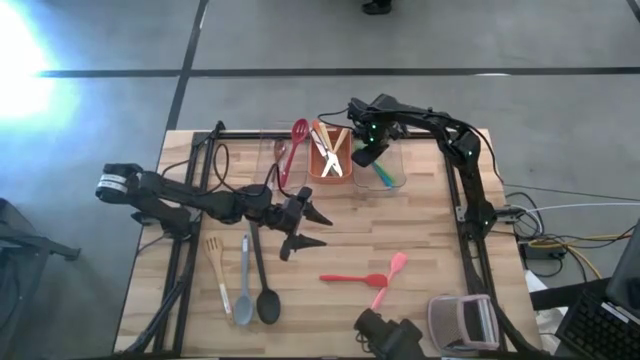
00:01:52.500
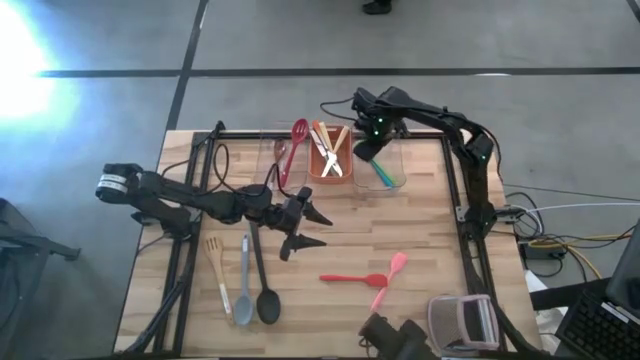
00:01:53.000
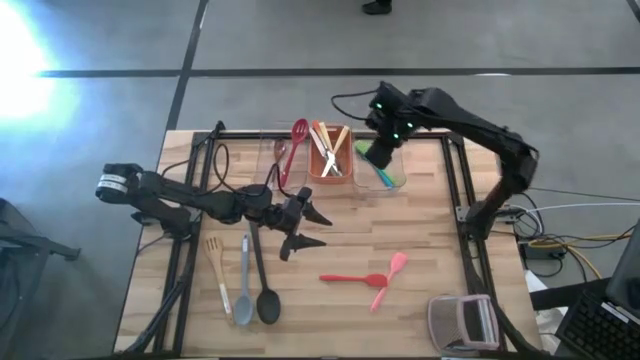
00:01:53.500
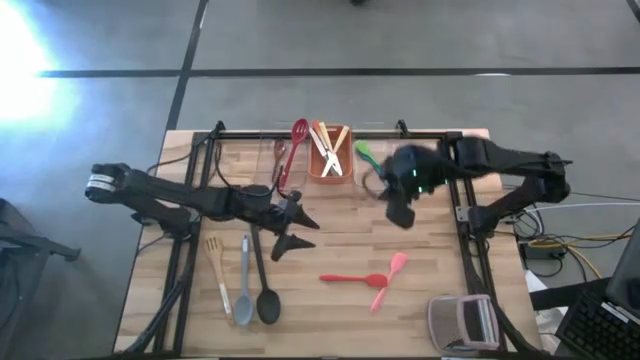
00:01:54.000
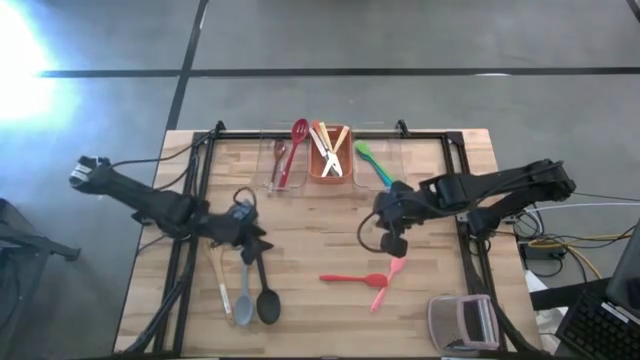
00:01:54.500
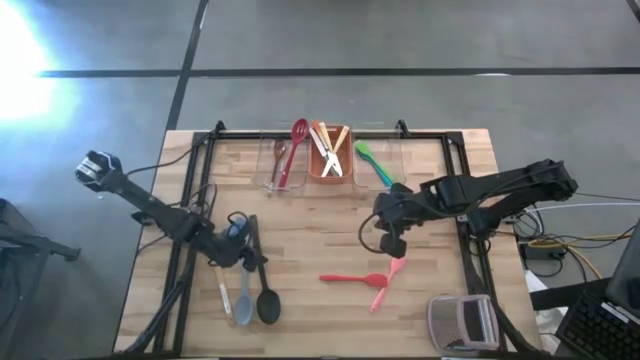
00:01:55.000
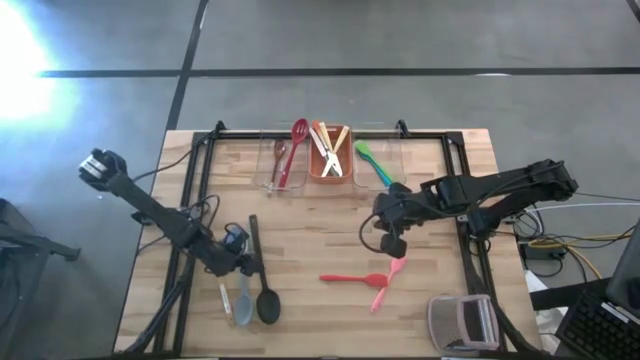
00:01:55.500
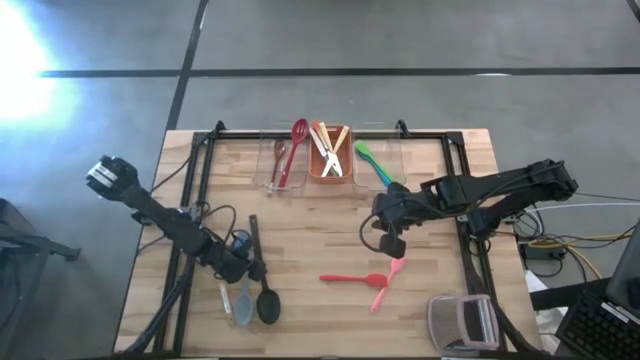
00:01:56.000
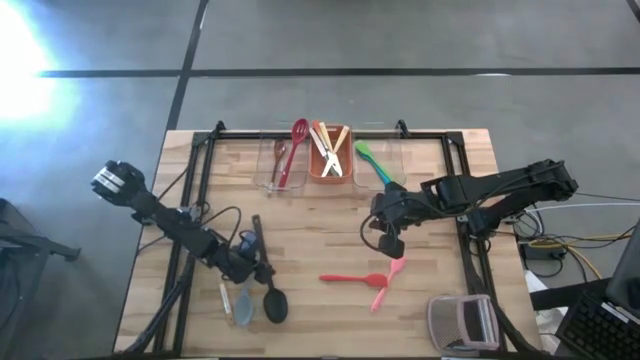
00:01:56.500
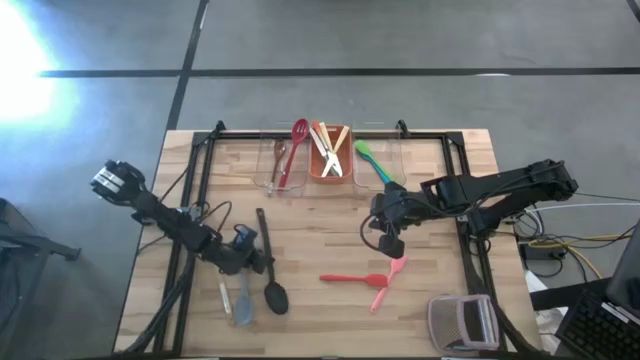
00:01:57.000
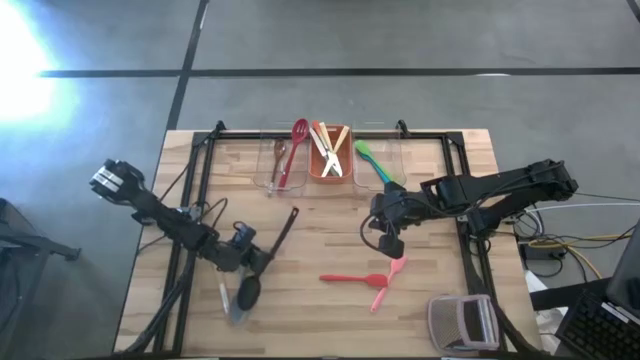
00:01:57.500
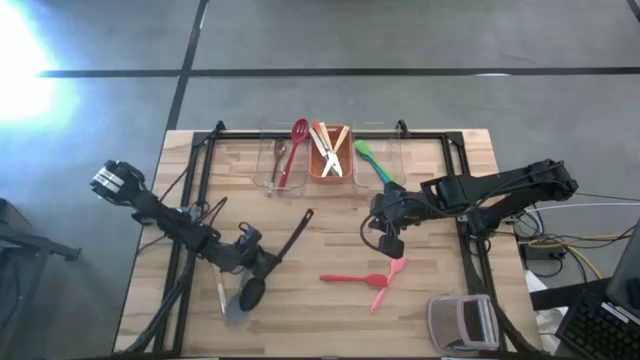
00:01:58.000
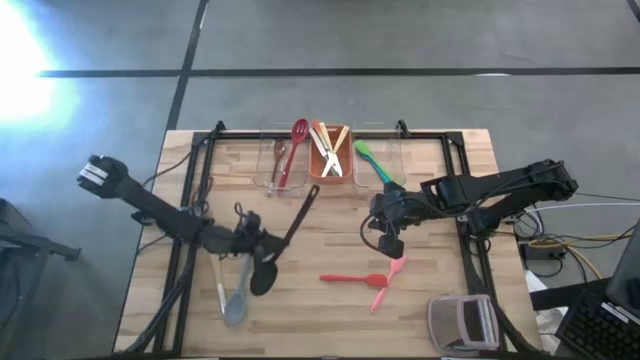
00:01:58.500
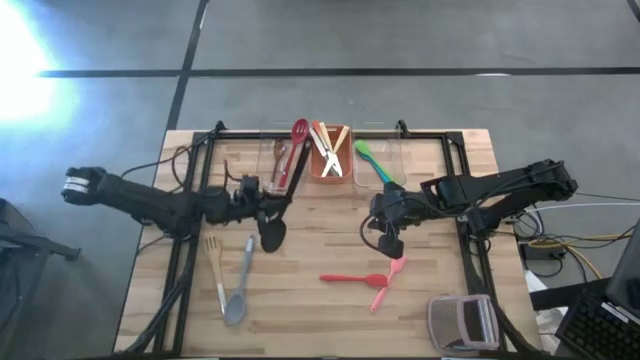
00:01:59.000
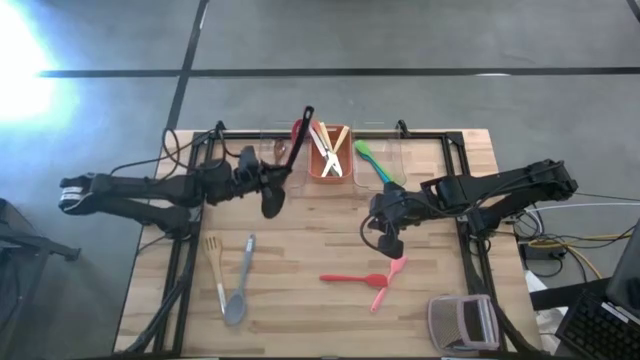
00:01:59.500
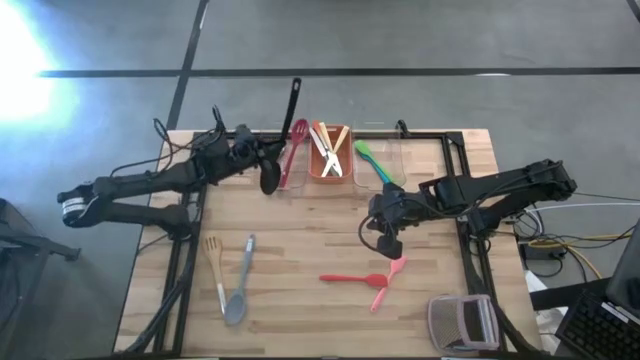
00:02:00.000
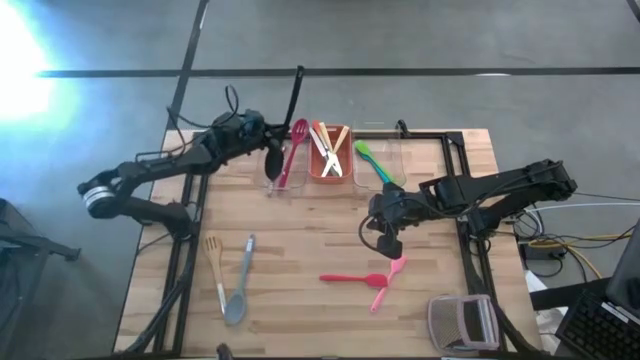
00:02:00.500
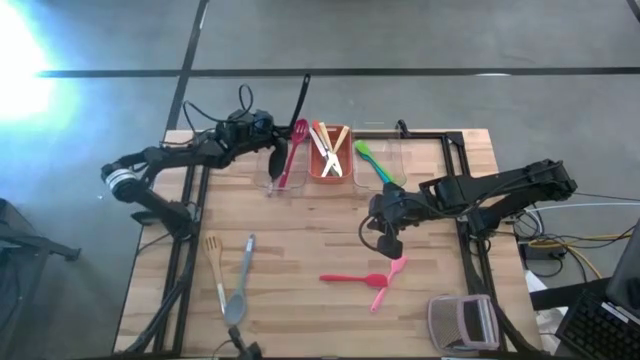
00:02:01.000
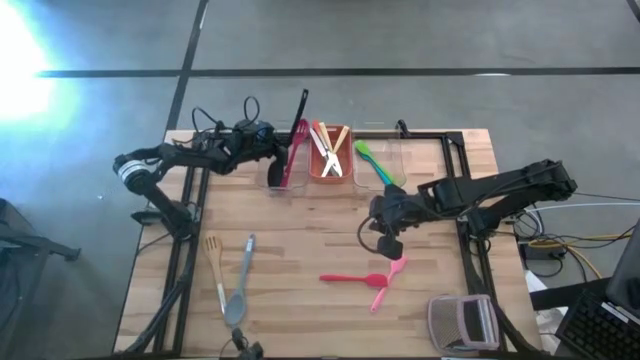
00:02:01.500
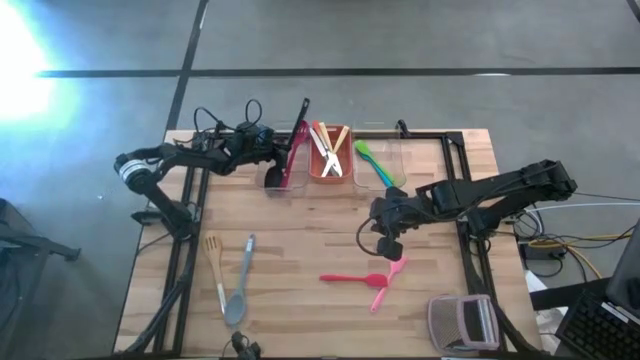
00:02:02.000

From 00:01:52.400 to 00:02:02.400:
Task: Pick & Place Kitchen Items
Put the black serving spoon into the left transparent bin

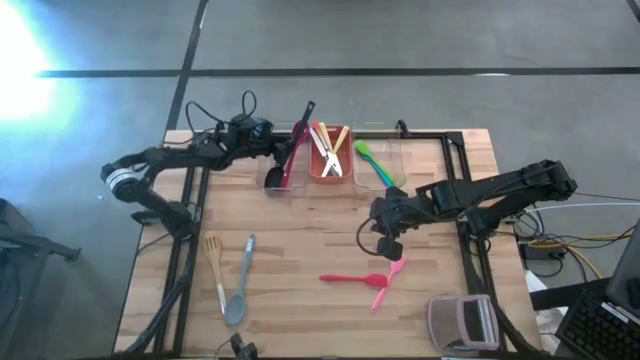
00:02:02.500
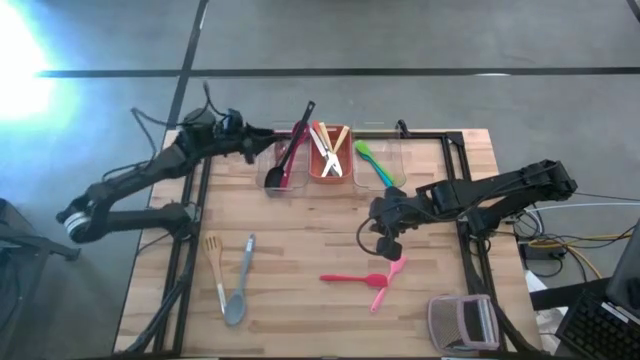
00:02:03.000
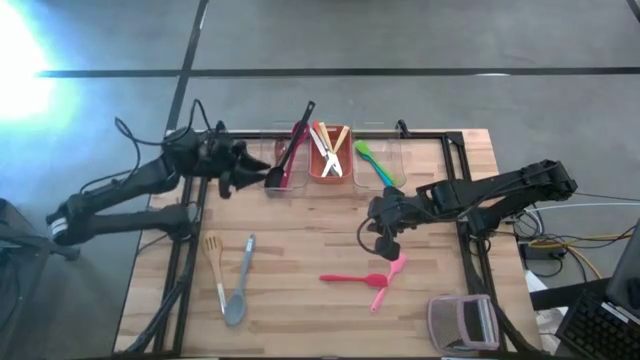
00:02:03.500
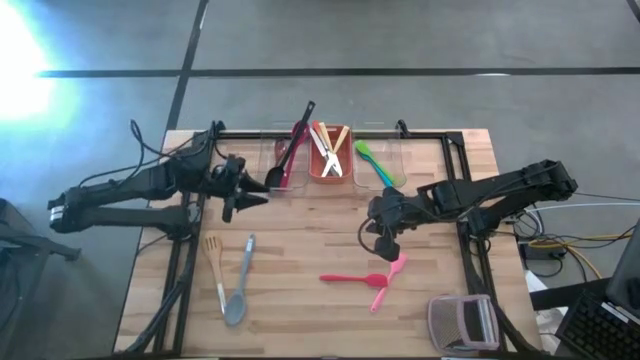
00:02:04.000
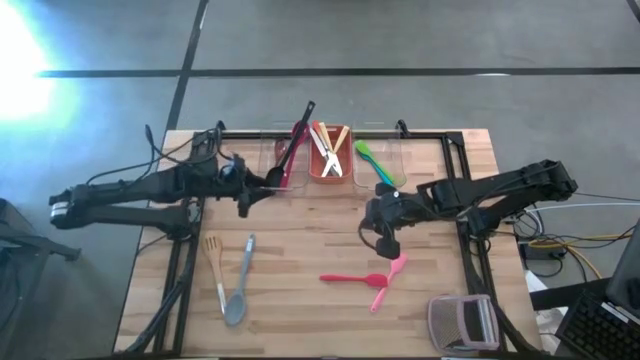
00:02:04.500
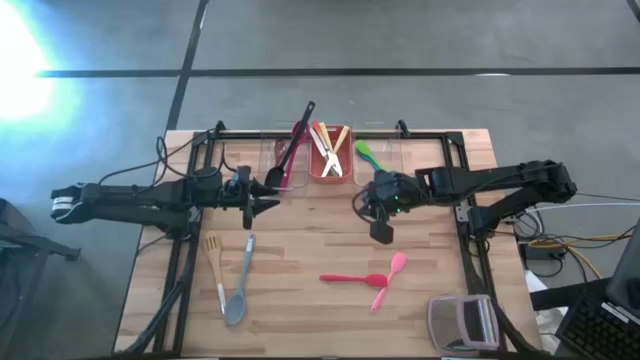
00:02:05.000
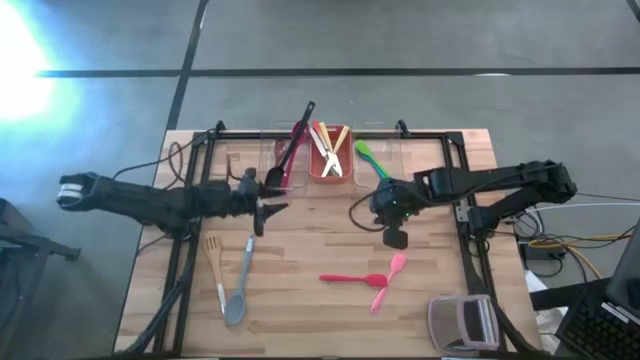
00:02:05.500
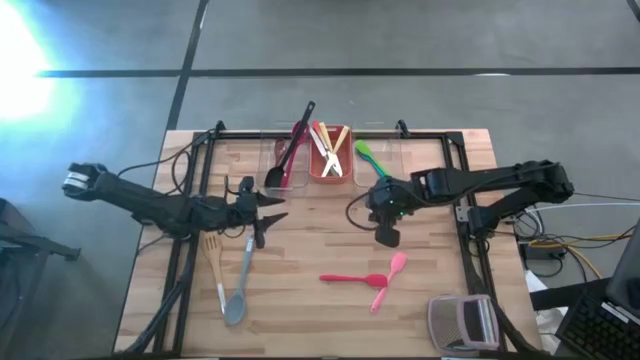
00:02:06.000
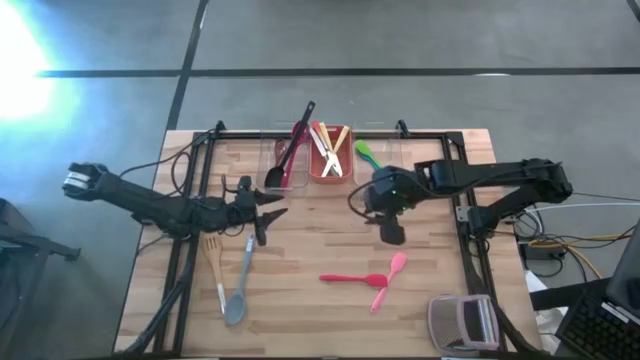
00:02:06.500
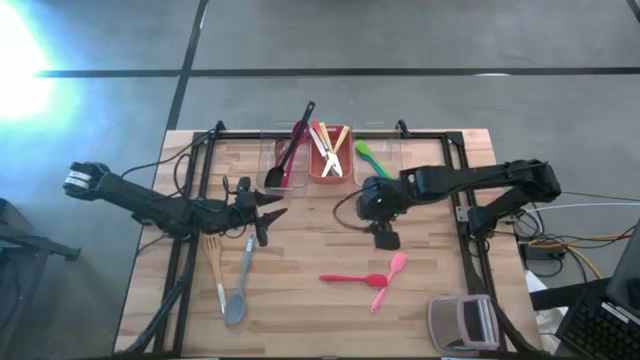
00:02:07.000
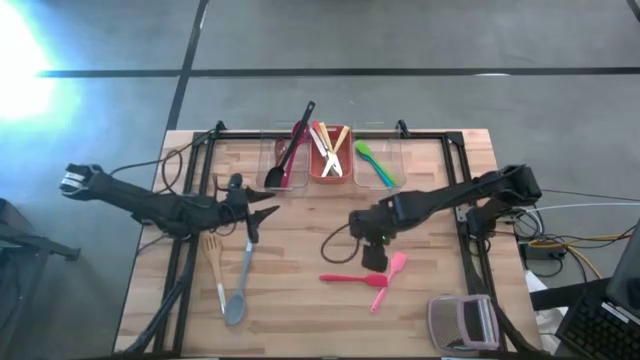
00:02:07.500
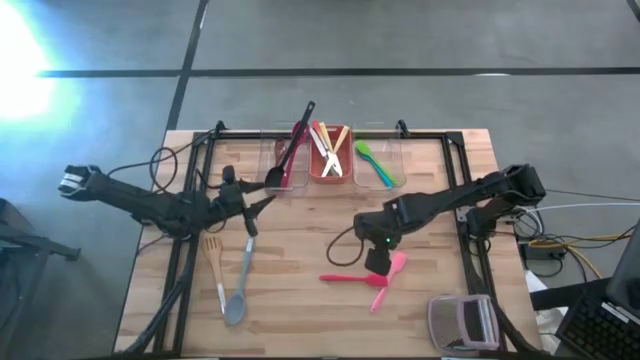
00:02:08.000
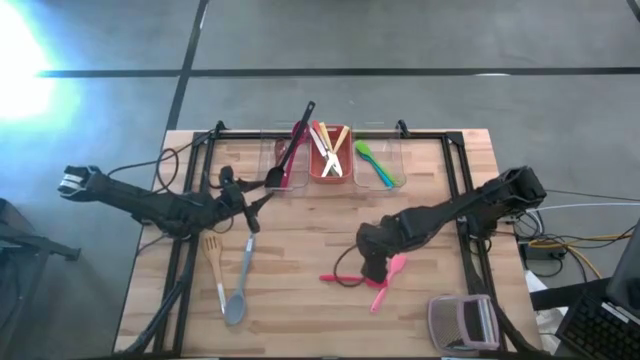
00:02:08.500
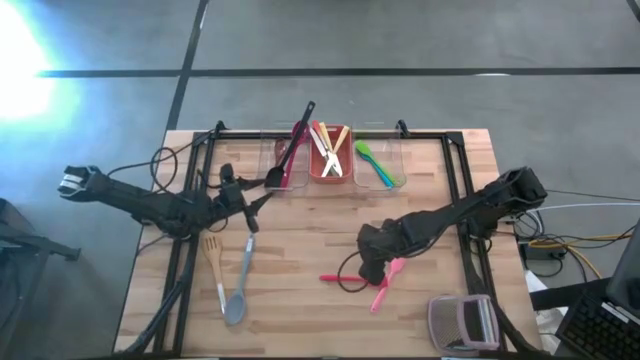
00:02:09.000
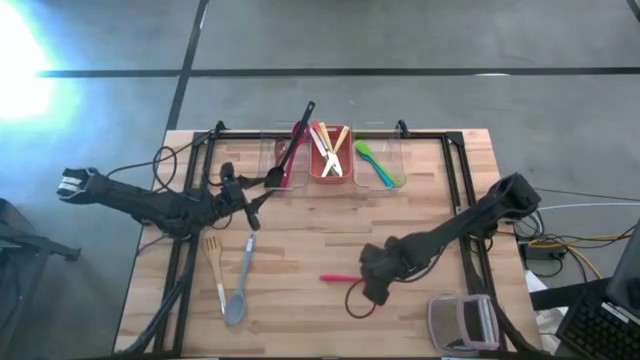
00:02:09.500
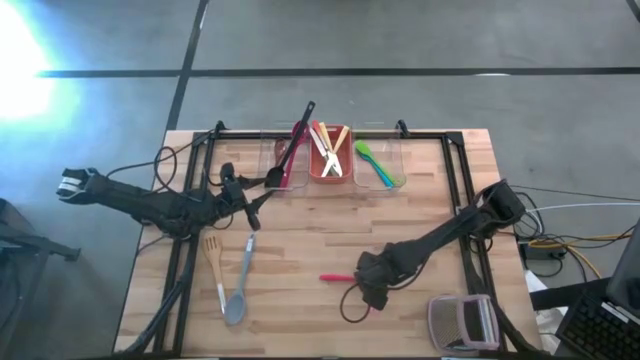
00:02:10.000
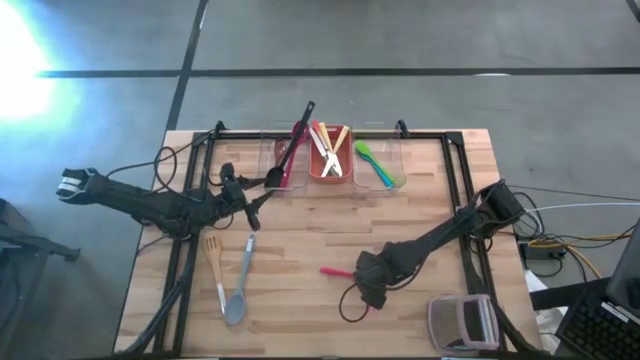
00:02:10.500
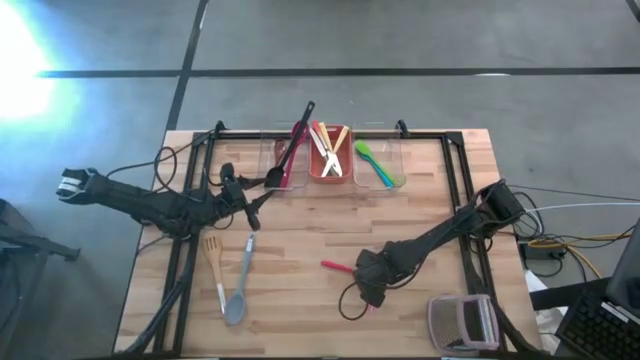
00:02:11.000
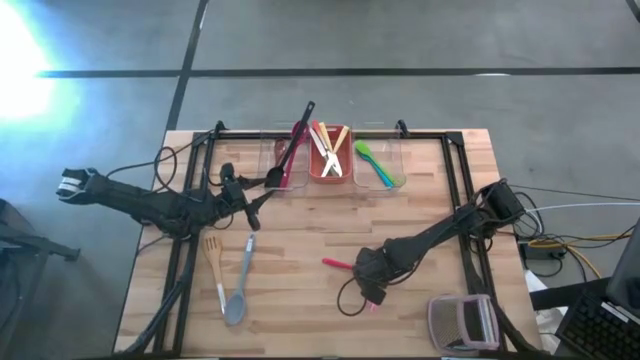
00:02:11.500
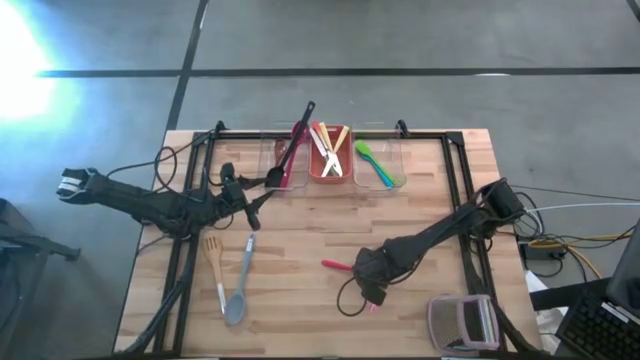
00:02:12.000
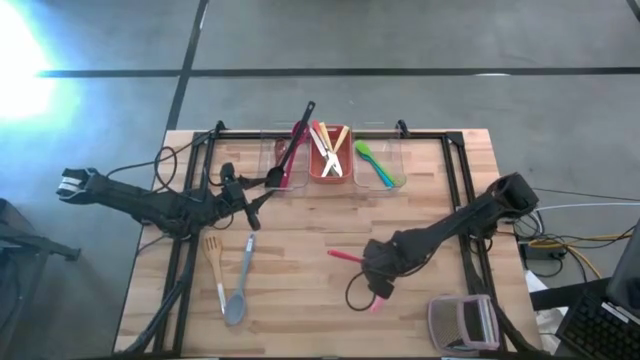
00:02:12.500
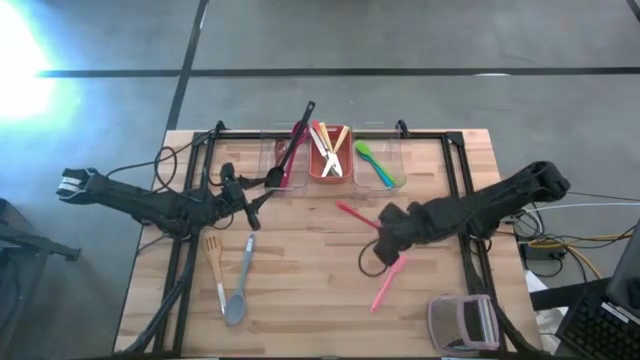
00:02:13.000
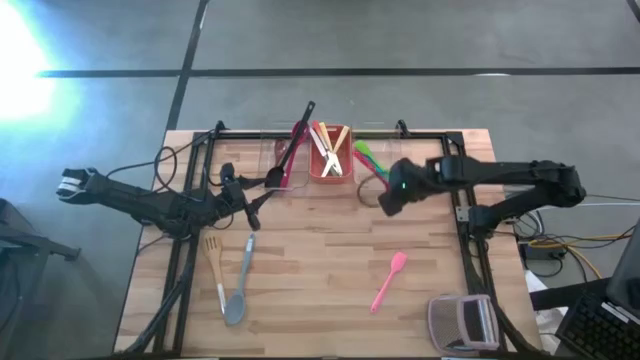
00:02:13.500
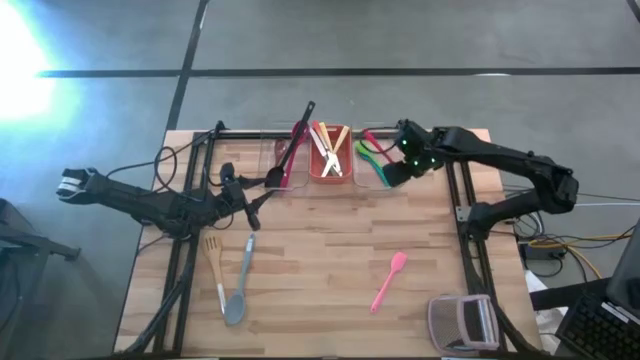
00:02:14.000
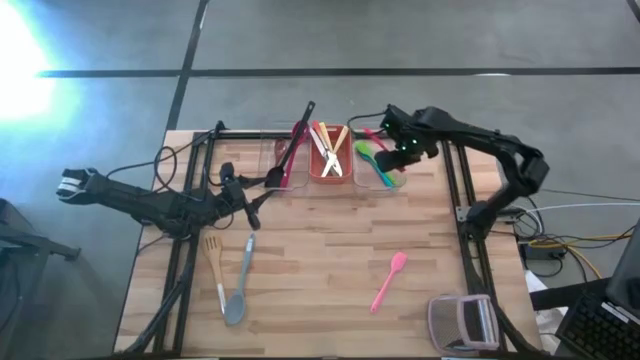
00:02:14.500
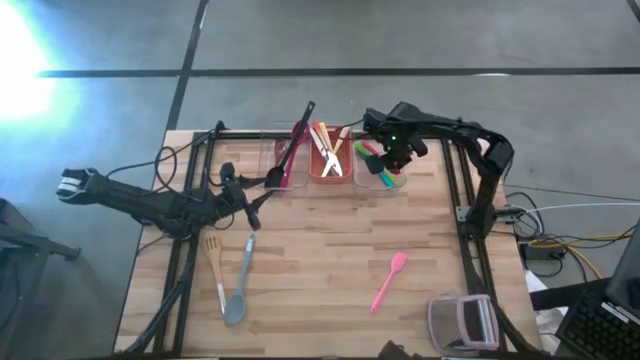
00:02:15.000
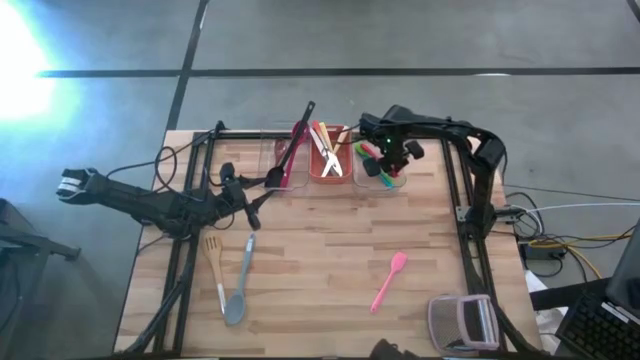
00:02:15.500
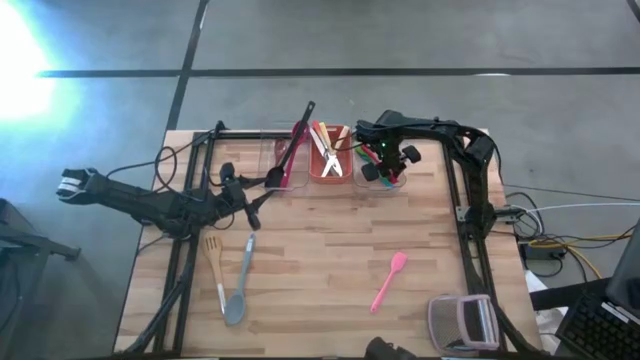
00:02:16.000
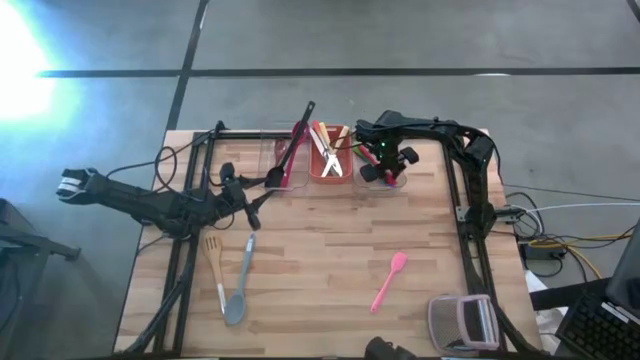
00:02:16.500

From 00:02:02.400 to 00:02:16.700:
Put the red spatula into the right transparent bin
